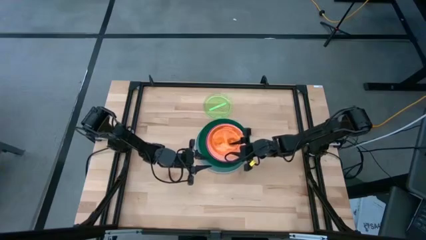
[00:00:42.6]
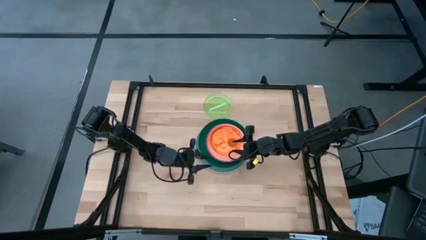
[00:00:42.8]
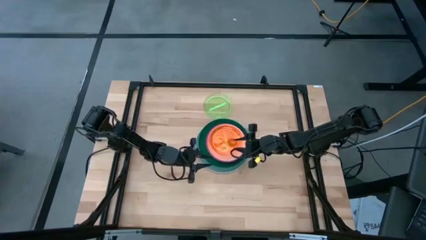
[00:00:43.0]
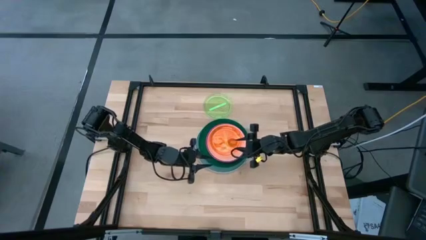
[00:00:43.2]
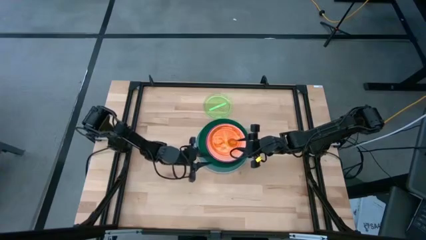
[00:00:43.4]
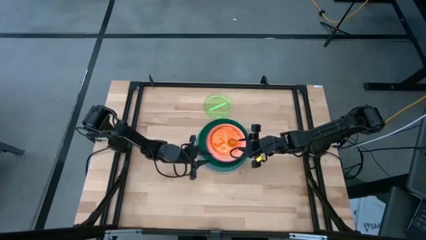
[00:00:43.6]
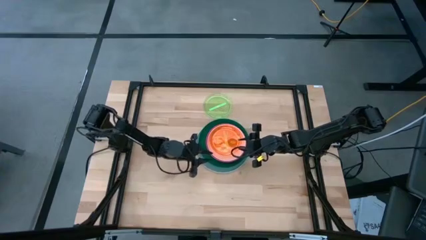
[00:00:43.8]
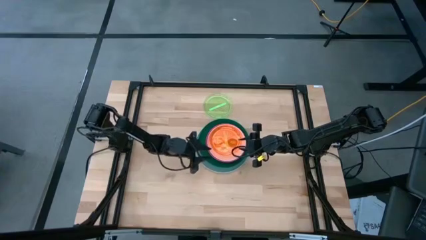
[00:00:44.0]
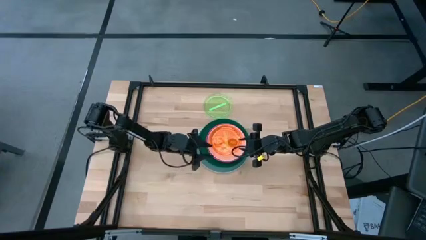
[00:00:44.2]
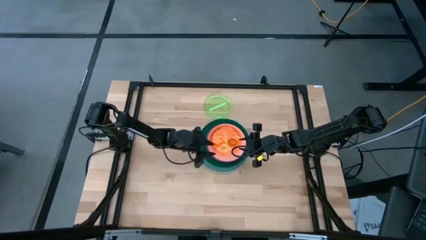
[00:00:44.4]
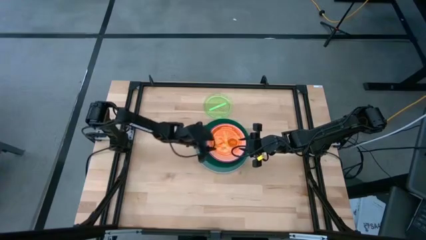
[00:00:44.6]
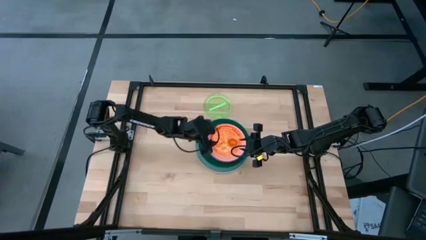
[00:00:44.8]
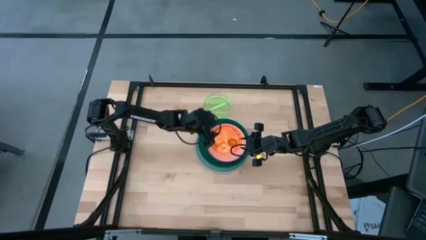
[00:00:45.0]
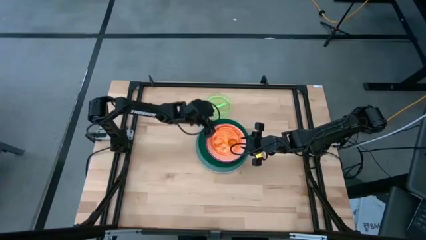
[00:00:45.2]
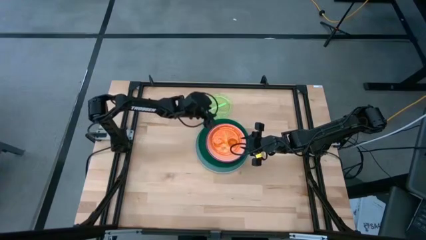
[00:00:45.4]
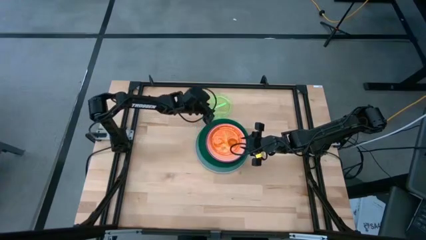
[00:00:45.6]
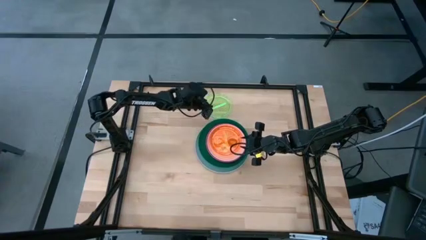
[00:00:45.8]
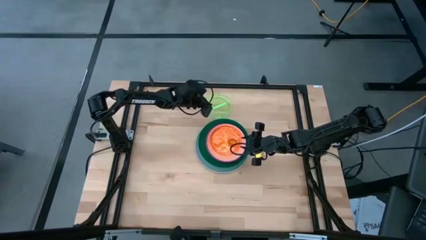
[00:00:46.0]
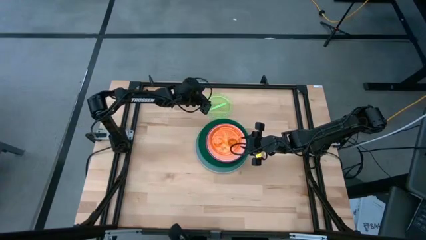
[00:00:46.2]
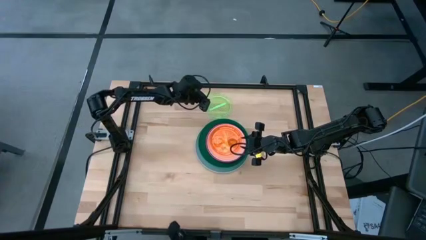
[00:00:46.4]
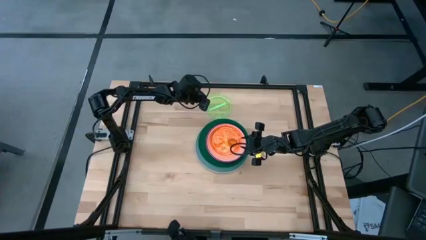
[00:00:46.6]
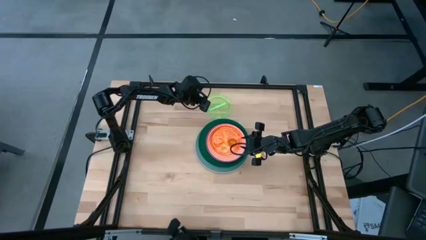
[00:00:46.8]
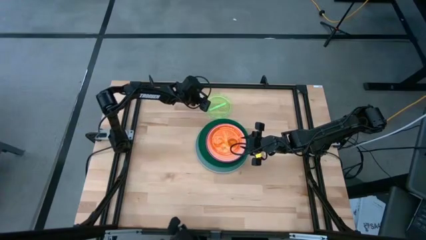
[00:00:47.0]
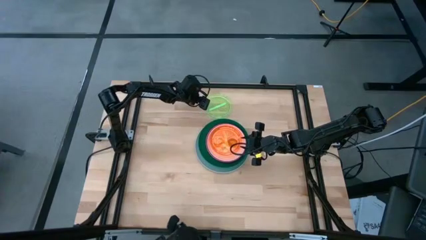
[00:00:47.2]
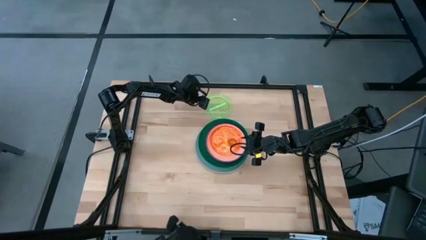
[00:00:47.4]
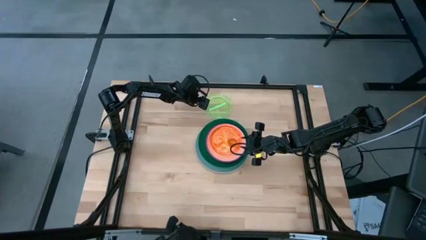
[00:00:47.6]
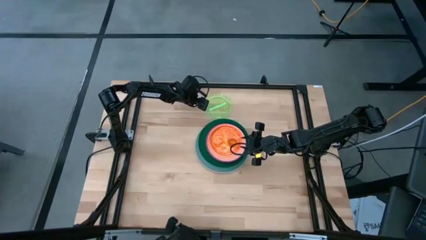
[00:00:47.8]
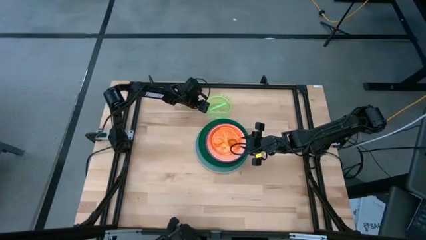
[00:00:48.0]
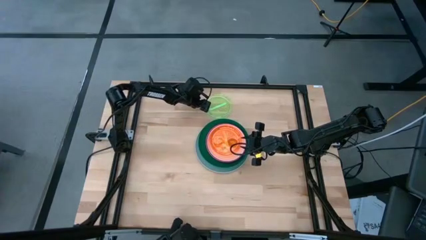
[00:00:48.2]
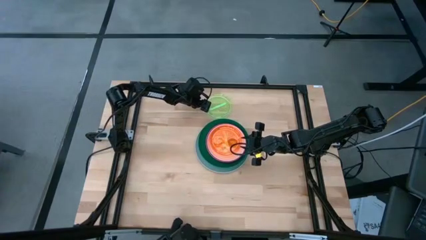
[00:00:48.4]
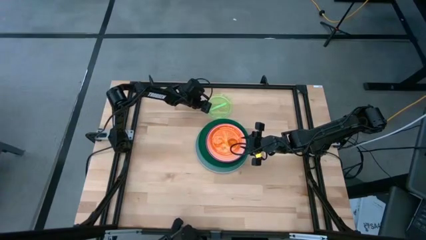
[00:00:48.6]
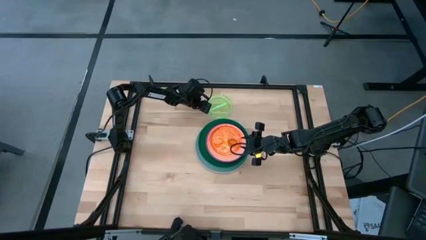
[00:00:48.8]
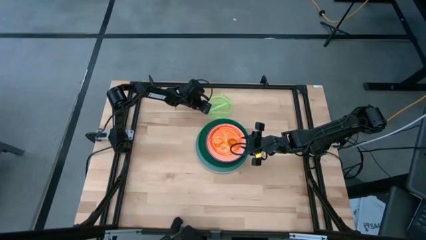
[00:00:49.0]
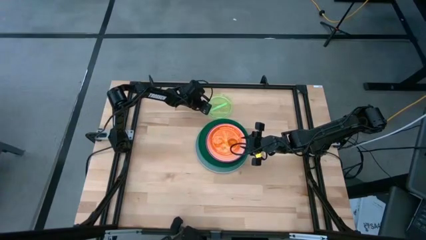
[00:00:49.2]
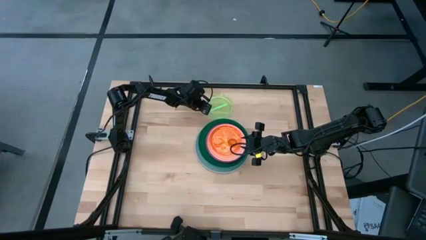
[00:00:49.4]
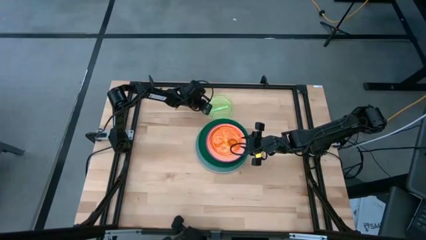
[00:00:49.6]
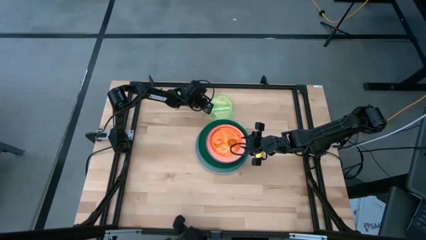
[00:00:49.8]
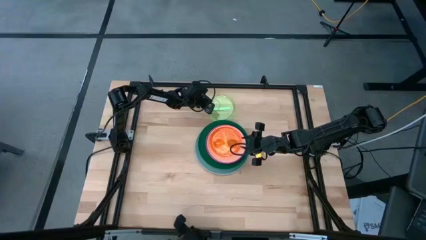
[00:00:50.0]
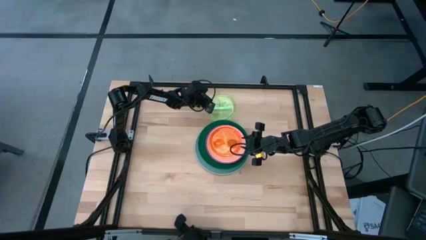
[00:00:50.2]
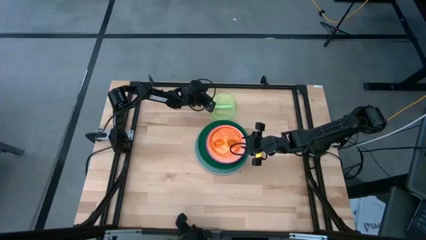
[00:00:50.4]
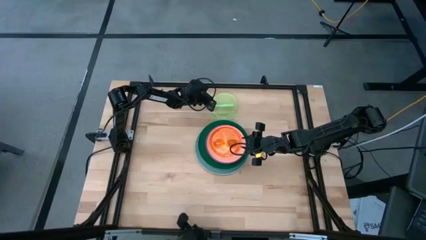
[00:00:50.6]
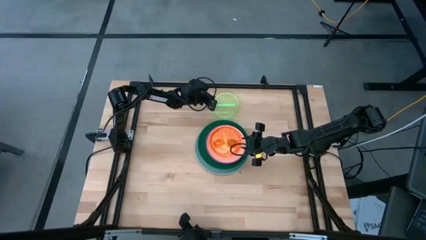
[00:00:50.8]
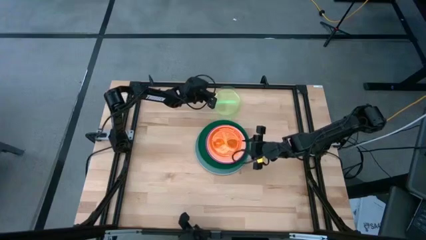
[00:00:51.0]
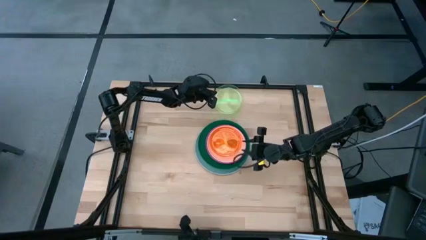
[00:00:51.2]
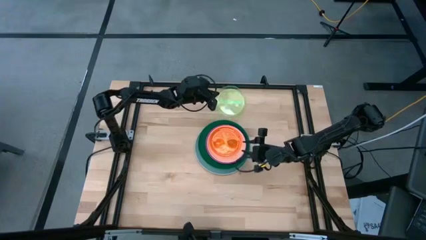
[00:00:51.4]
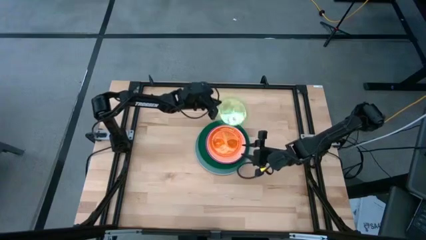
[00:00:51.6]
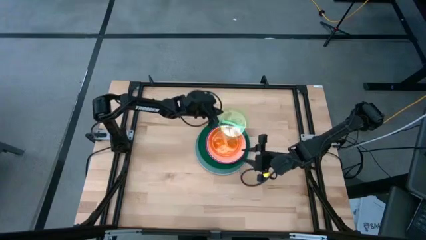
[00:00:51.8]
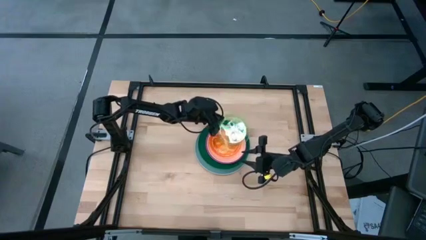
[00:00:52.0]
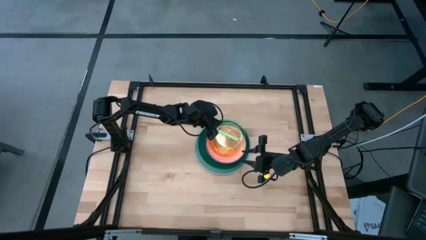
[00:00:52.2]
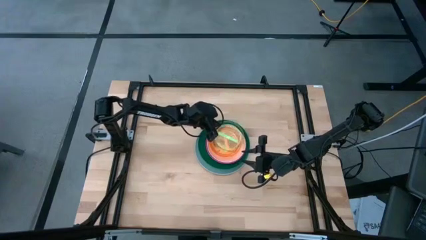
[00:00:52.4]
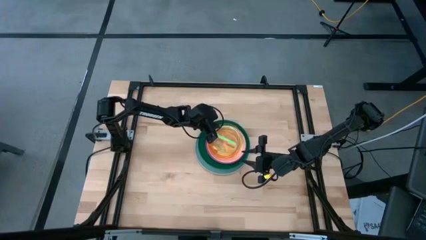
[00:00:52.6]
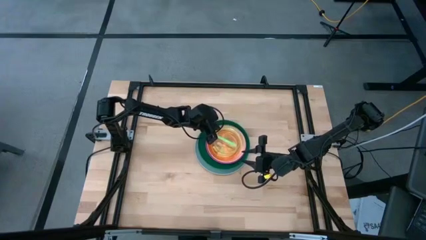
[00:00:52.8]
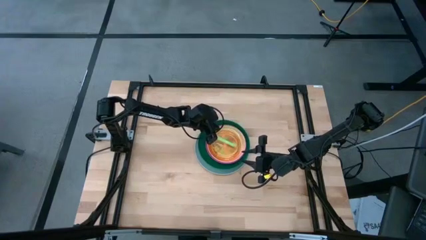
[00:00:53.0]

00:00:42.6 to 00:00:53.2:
Task: Stack plastic plates
Stack the green plate on top of orange plate
